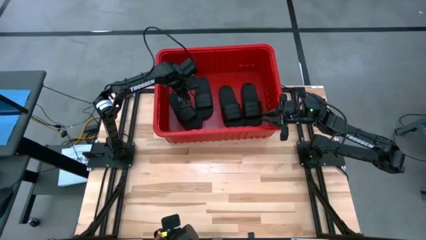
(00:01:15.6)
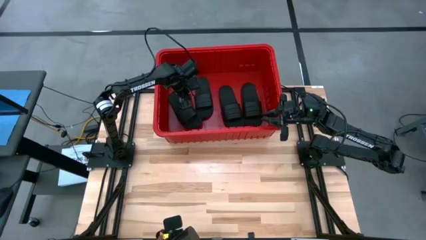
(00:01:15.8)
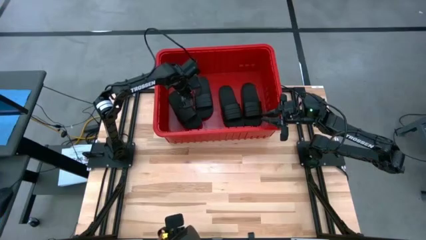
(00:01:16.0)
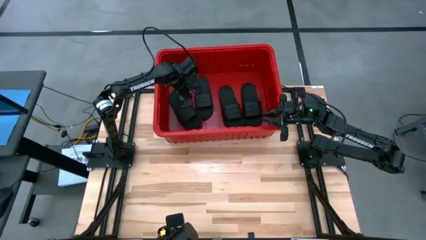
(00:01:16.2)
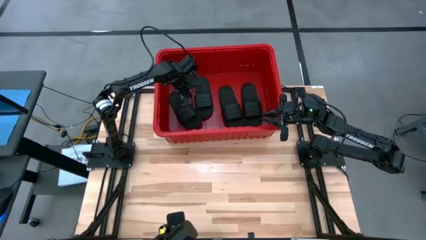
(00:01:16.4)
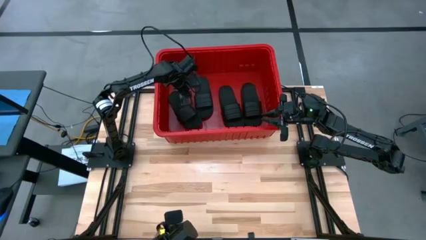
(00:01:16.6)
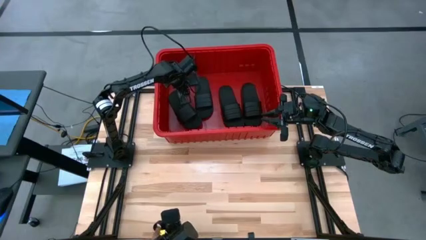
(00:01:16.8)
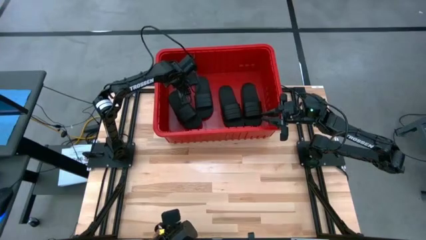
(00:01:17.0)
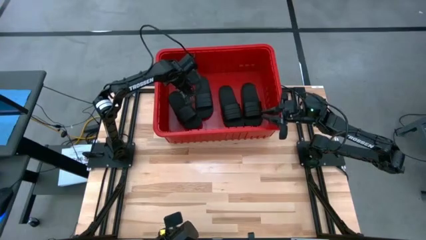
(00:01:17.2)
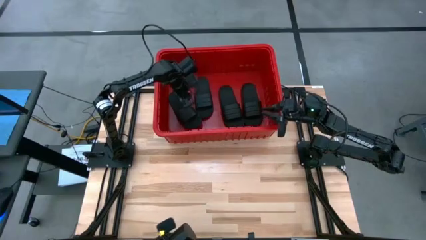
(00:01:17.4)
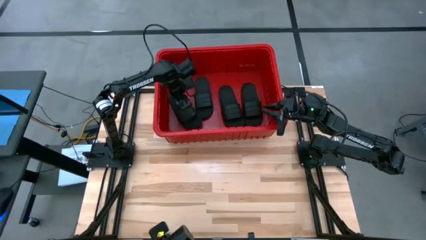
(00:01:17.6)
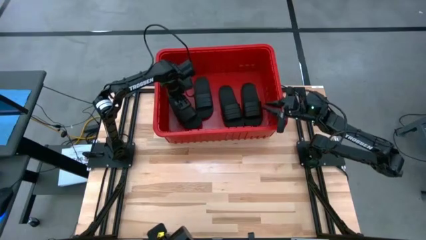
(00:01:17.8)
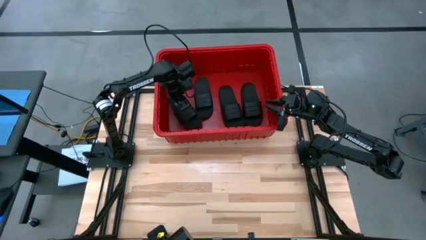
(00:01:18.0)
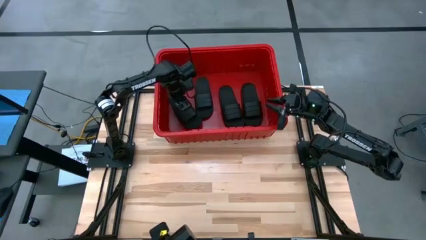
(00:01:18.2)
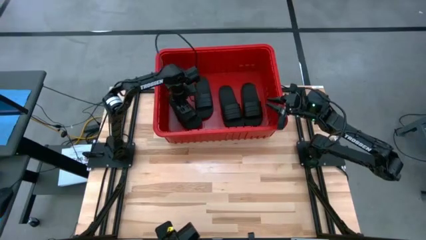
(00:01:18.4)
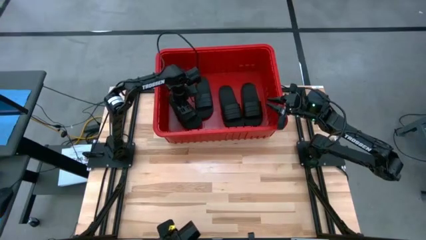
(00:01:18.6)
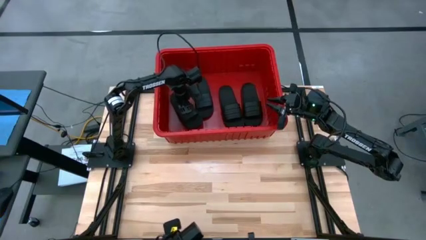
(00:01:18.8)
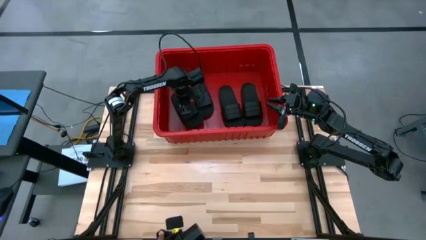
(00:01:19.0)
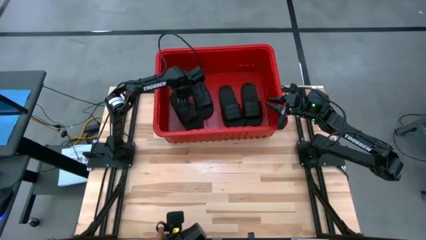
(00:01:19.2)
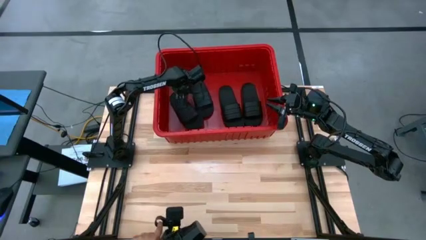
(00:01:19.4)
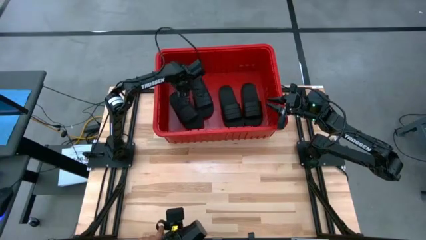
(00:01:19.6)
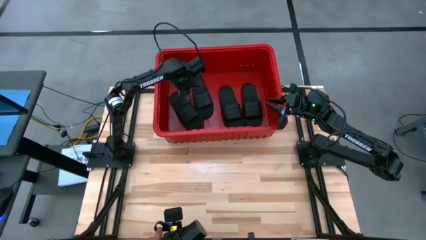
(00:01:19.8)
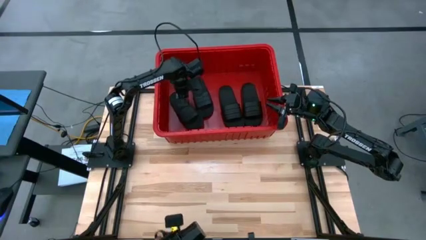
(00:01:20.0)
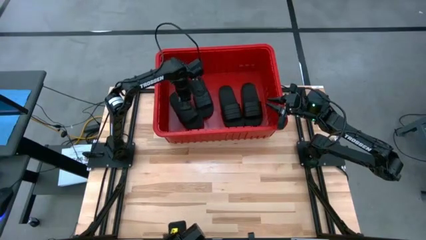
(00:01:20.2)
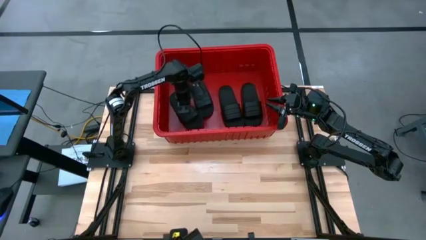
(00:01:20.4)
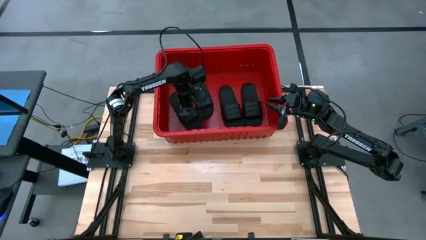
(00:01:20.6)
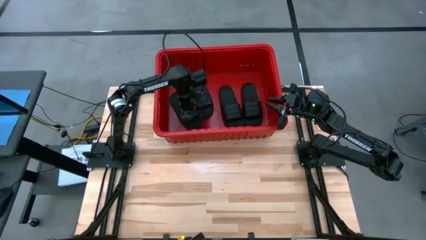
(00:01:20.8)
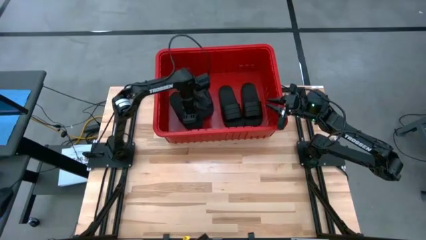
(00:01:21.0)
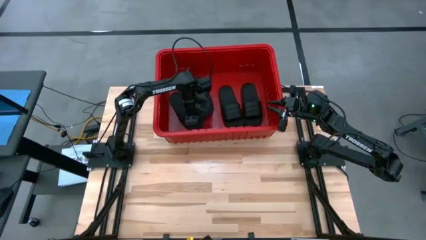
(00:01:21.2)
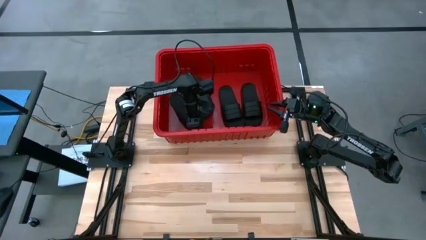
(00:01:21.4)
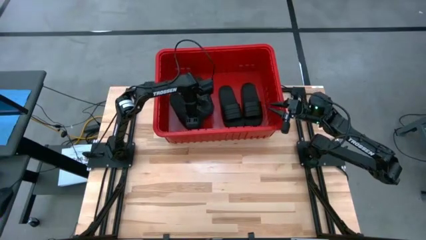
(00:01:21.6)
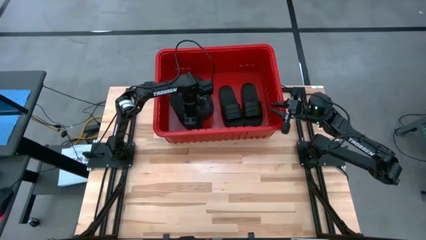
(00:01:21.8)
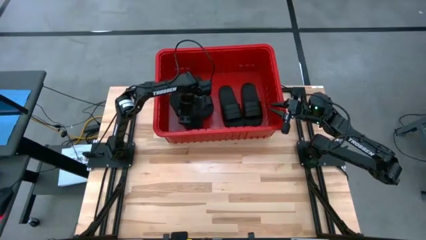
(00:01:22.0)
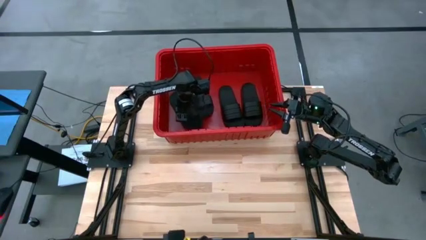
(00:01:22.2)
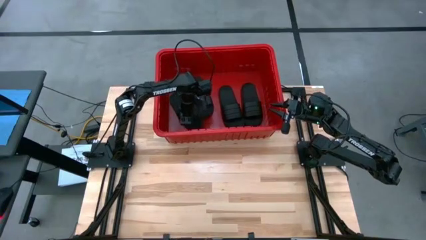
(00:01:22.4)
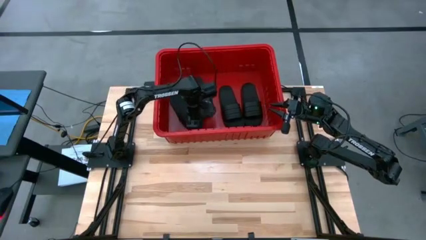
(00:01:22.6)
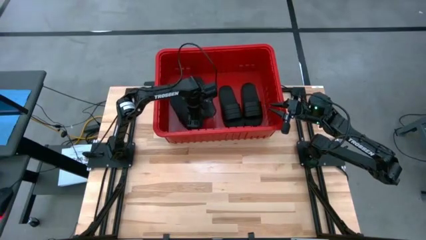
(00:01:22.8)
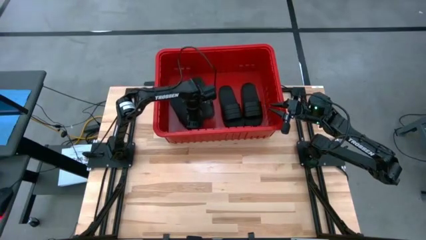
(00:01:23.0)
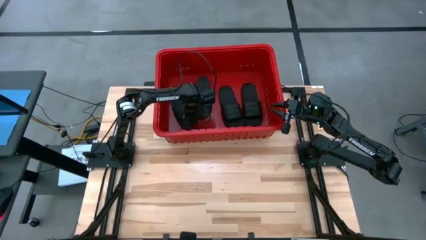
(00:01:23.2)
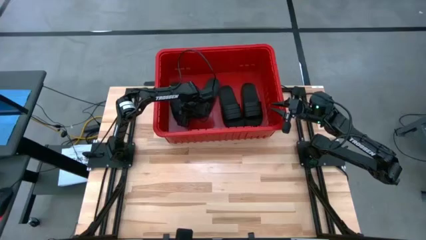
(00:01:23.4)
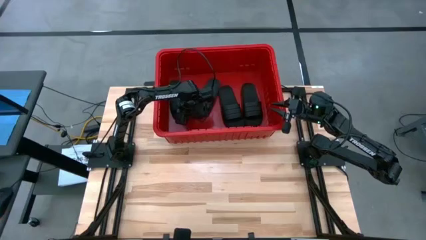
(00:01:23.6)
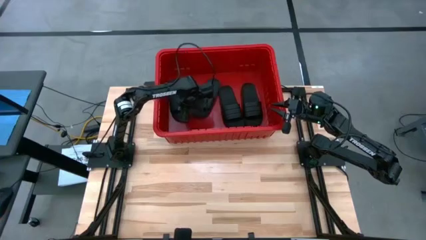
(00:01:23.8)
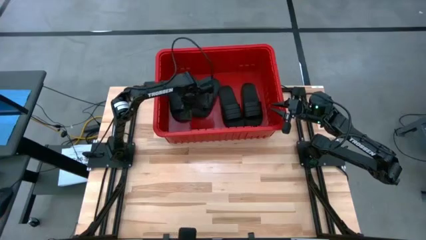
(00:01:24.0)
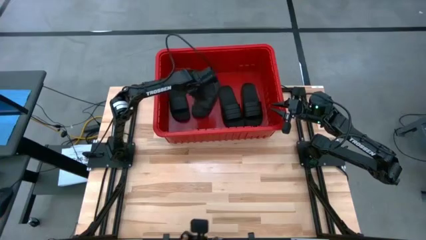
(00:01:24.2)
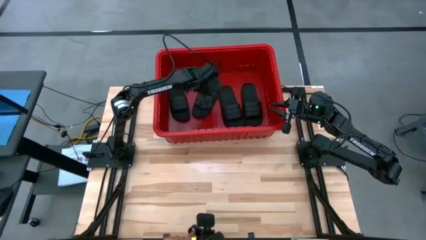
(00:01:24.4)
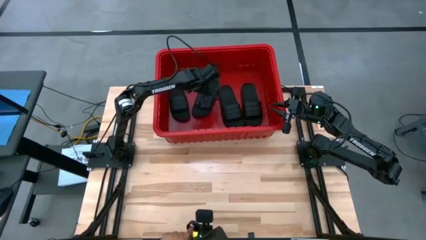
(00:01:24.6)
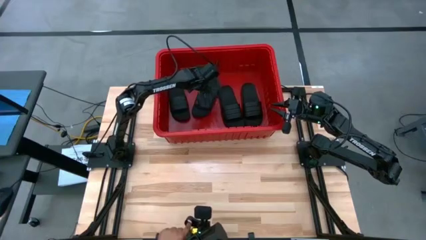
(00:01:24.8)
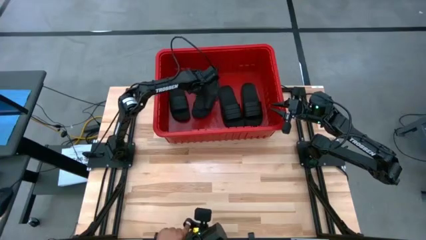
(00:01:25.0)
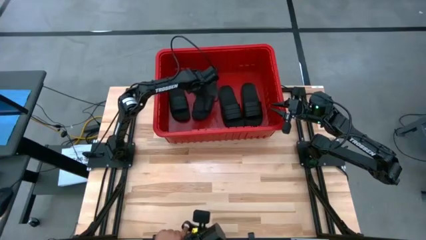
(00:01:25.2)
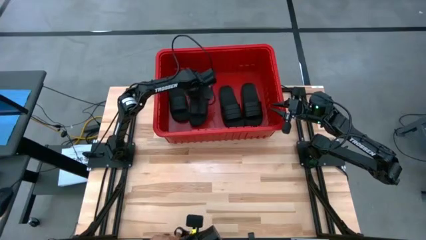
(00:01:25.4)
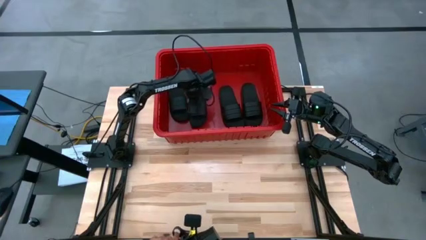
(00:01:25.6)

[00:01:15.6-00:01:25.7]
Task: Pick and place slides into bin
Adjust the black slides in the red container
